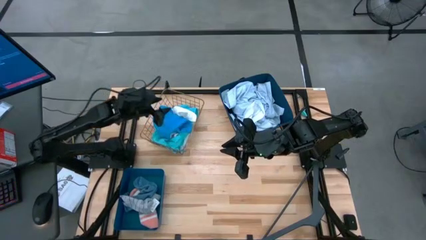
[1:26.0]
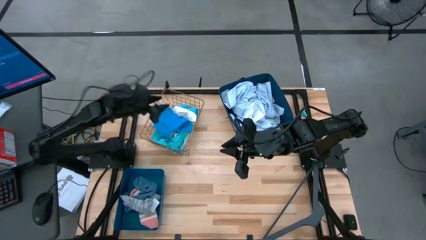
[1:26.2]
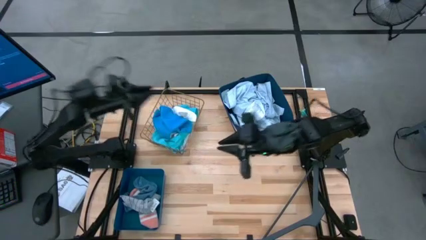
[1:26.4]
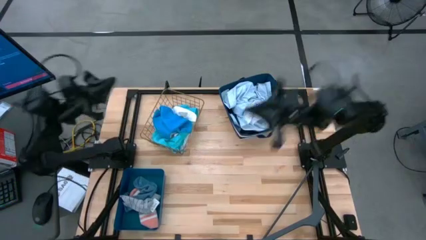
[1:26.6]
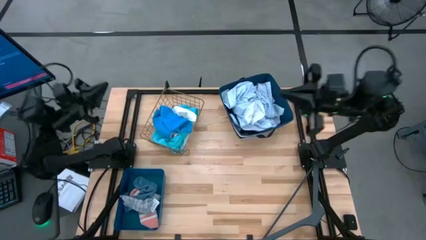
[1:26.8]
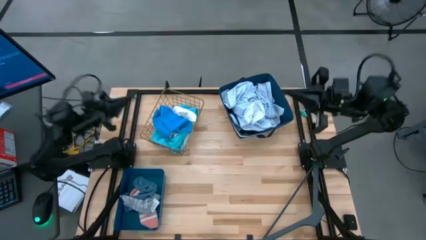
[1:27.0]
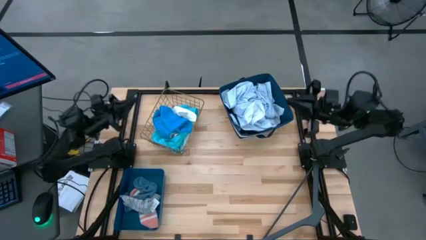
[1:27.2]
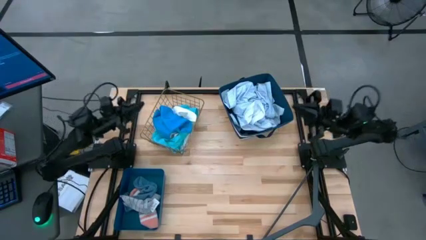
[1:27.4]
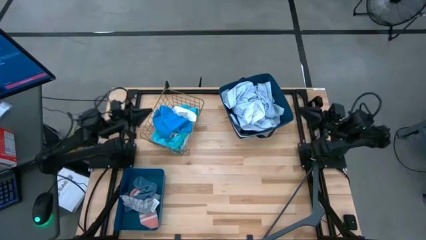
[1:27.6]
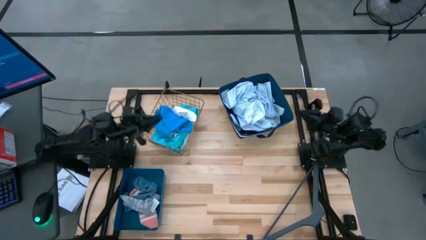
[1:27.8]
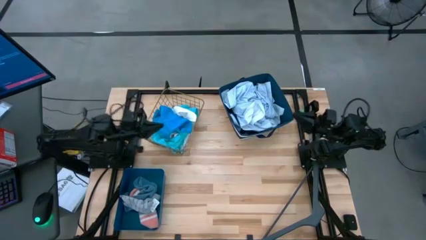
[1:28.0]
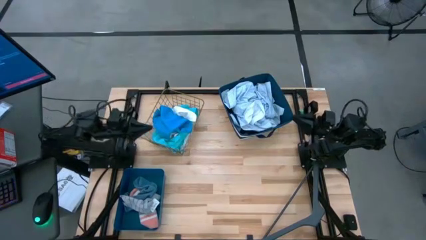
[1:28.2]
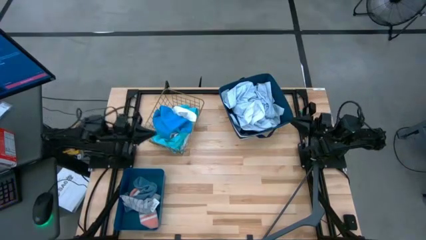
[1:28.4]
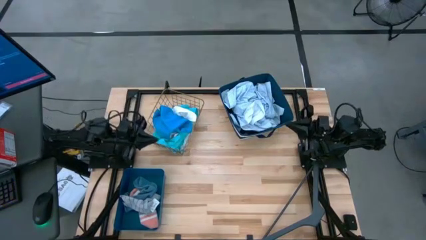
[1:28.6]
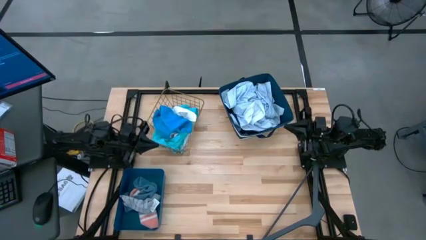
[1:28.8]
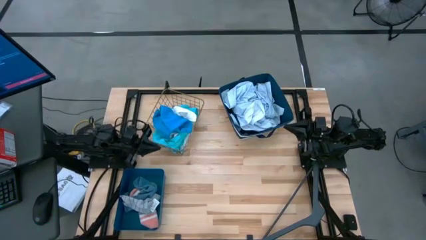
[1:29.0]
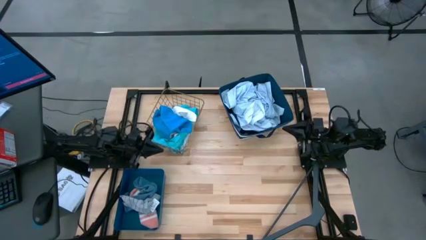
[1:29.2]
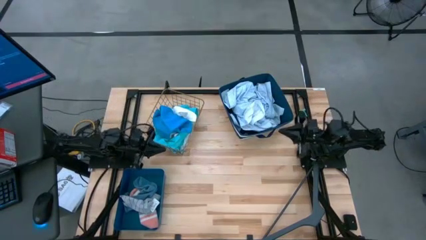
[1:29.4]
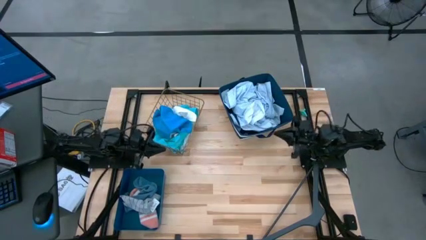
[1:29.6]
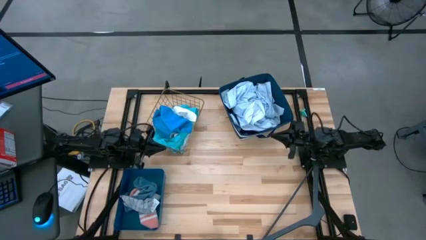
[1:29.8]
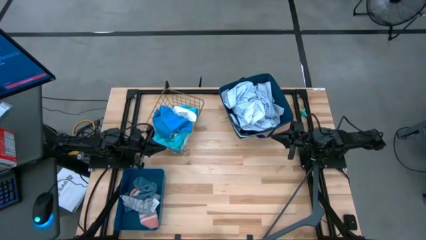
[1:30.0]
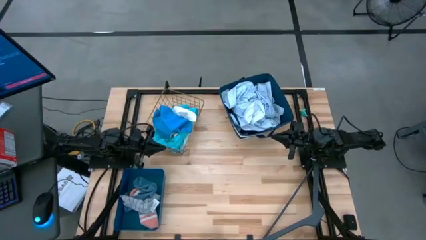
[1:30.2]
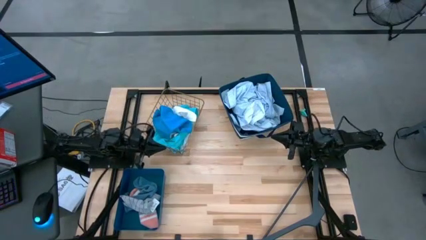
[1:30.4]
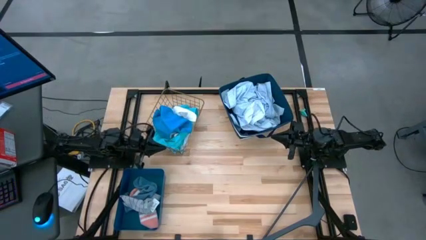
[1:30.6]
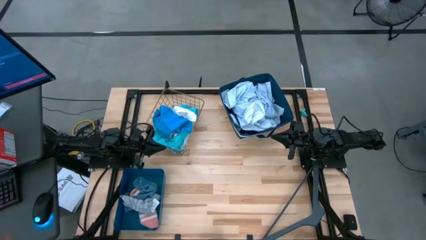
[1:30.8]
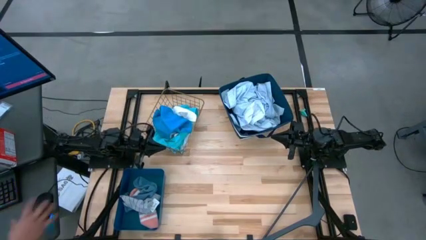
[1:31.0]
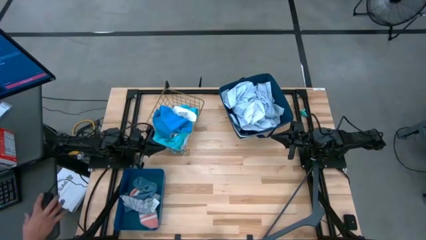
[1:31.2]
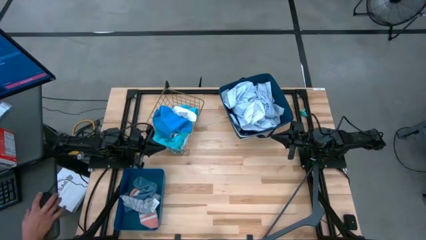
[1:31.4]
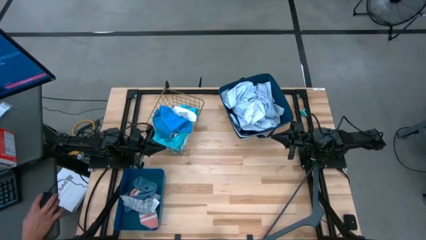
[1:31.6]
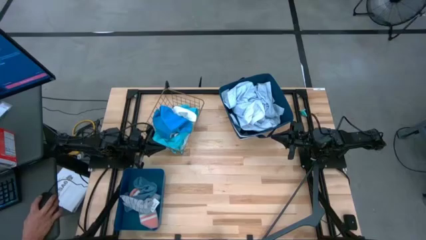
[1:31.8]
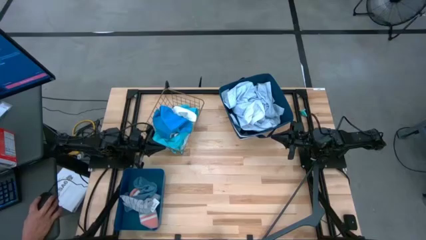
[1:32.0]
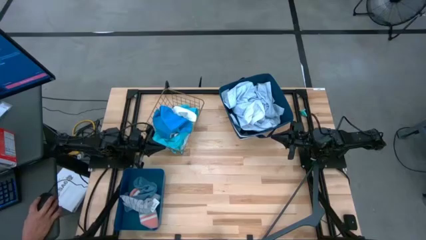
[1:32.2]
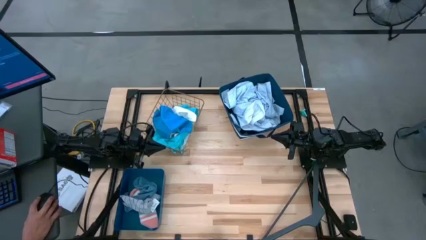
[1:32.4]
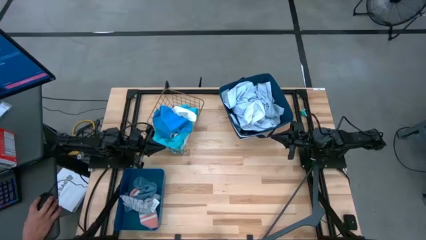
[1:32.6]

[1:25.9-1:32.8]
Task: Pick & Place Cloths
Return to Home Position

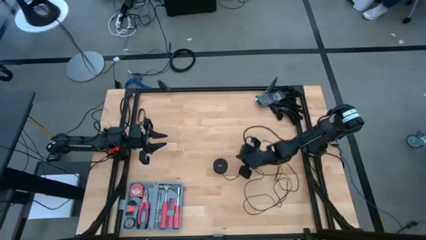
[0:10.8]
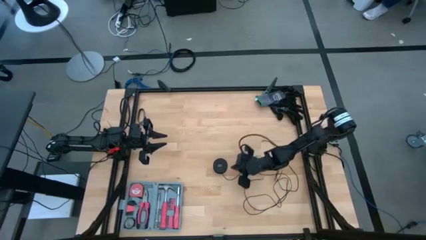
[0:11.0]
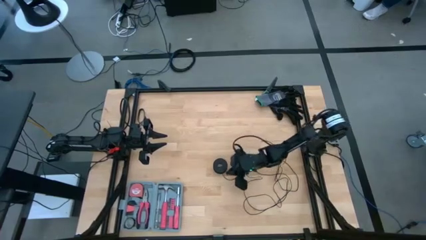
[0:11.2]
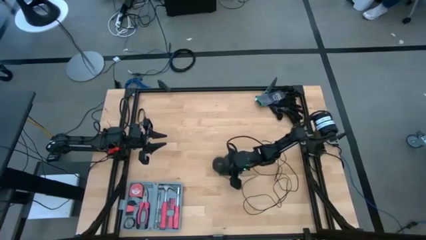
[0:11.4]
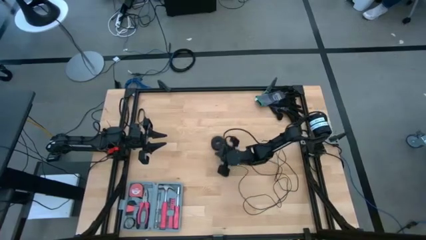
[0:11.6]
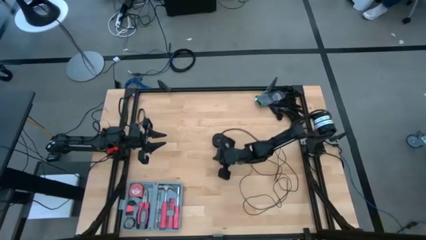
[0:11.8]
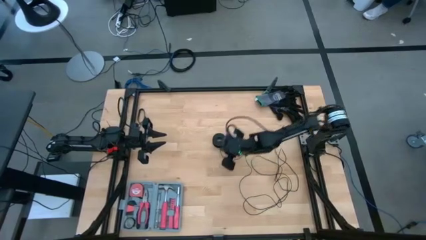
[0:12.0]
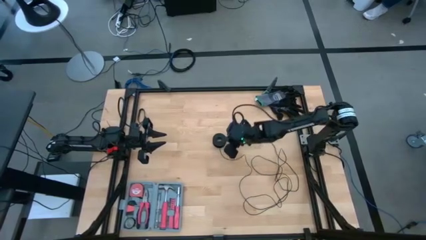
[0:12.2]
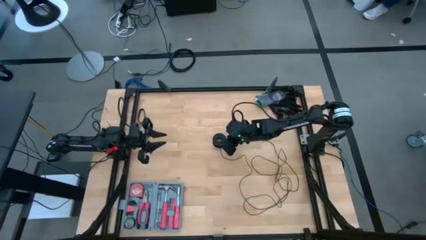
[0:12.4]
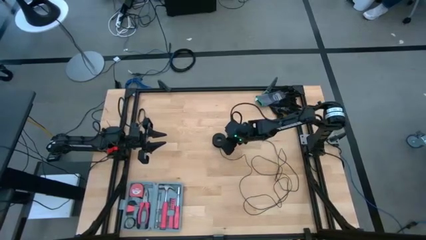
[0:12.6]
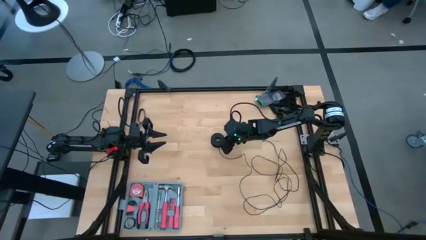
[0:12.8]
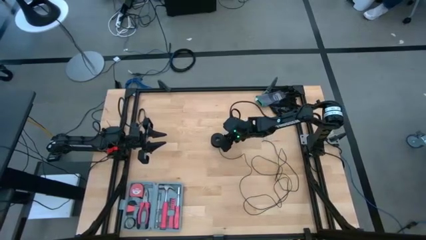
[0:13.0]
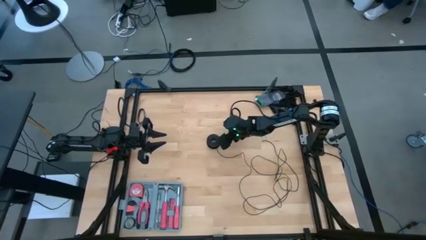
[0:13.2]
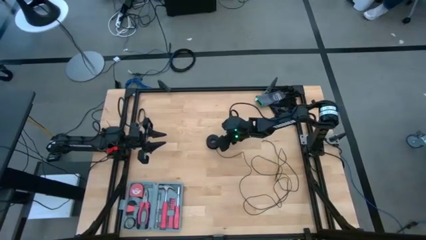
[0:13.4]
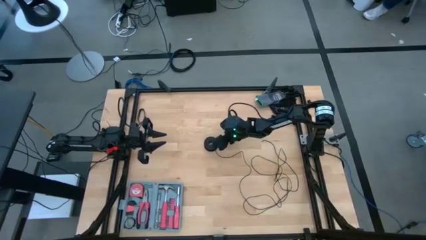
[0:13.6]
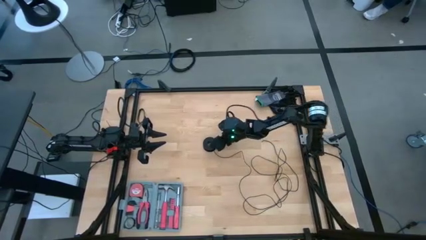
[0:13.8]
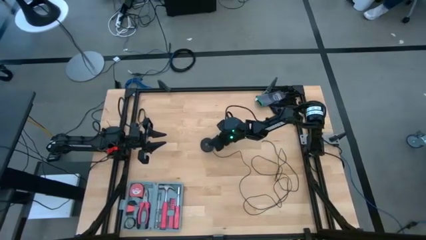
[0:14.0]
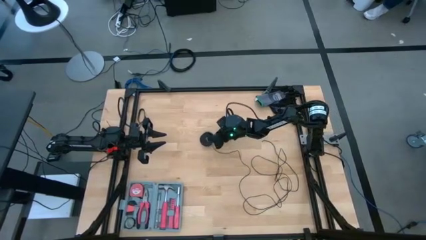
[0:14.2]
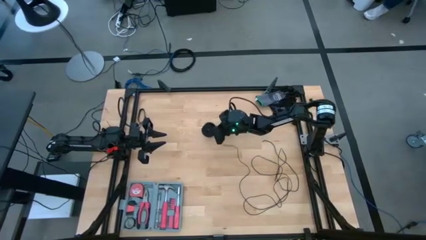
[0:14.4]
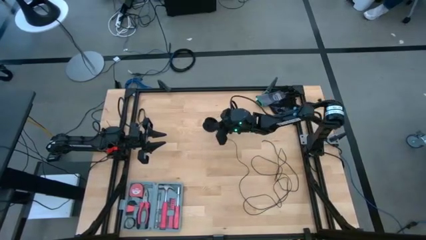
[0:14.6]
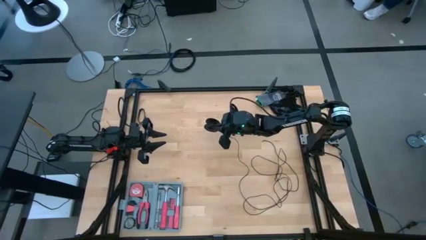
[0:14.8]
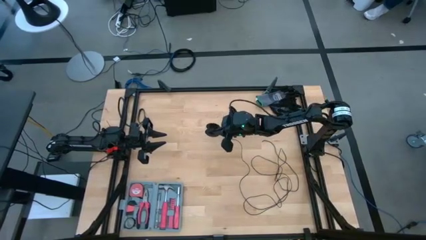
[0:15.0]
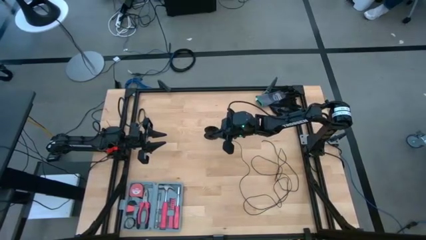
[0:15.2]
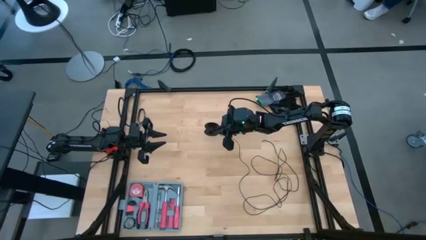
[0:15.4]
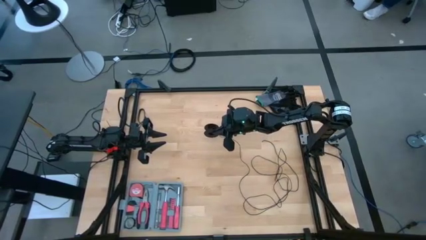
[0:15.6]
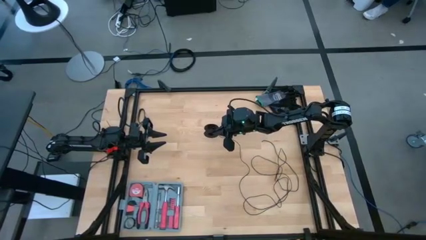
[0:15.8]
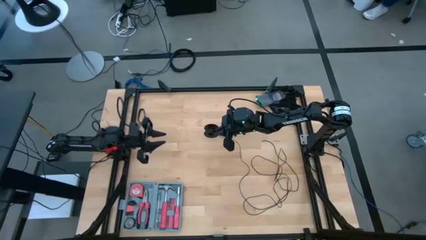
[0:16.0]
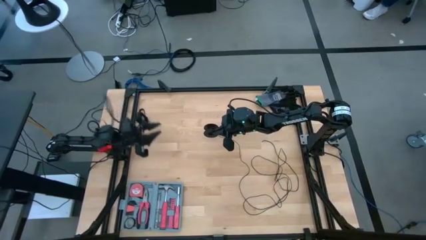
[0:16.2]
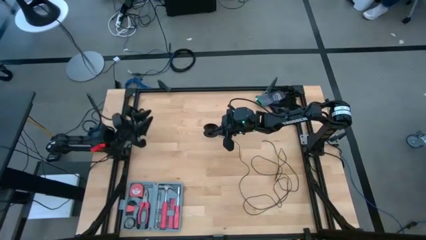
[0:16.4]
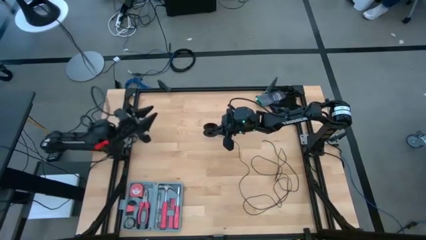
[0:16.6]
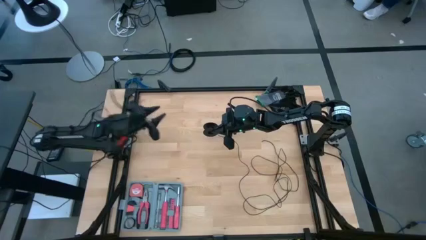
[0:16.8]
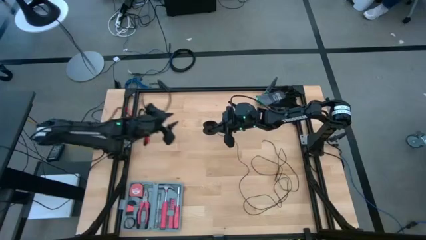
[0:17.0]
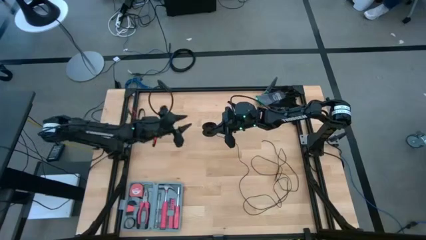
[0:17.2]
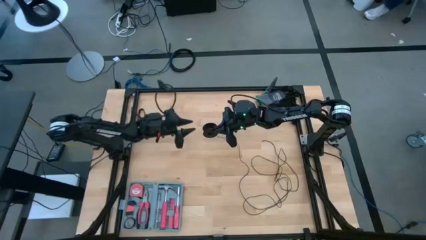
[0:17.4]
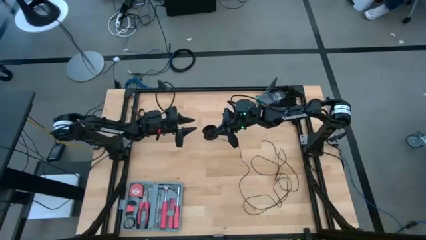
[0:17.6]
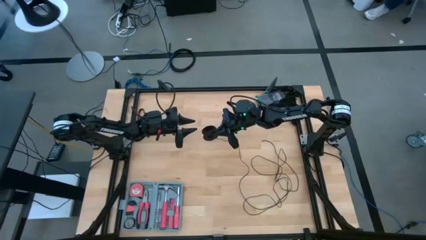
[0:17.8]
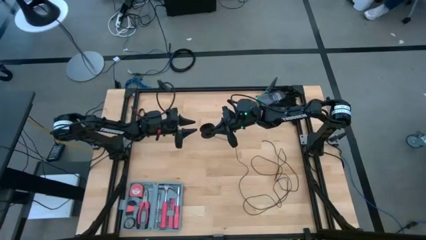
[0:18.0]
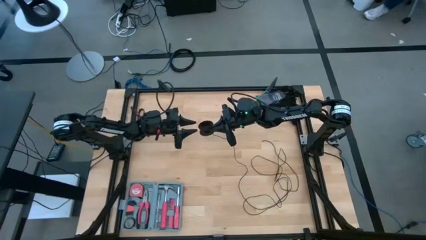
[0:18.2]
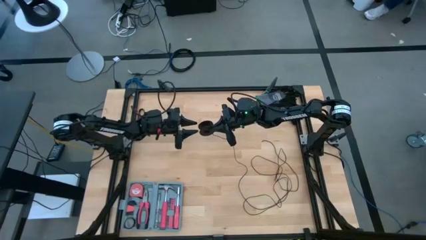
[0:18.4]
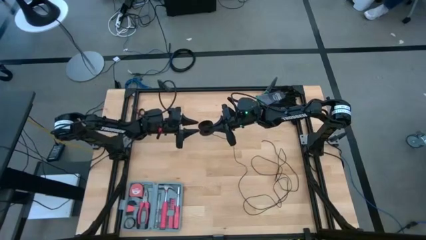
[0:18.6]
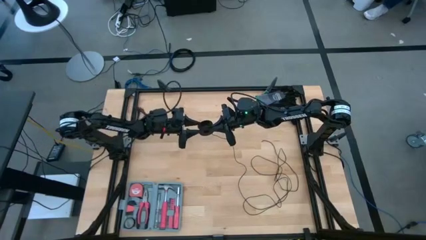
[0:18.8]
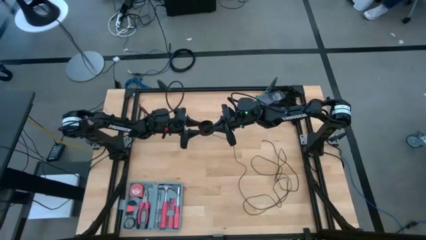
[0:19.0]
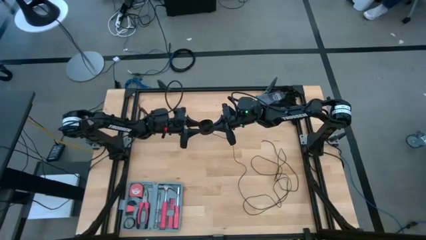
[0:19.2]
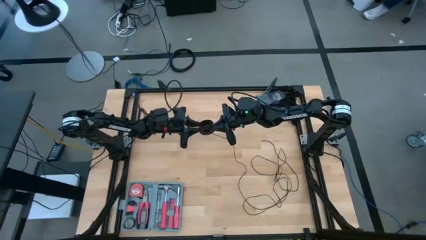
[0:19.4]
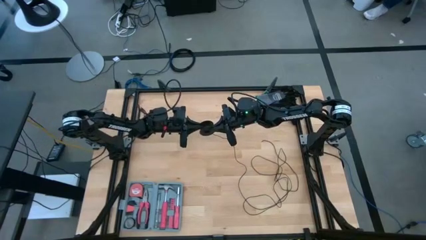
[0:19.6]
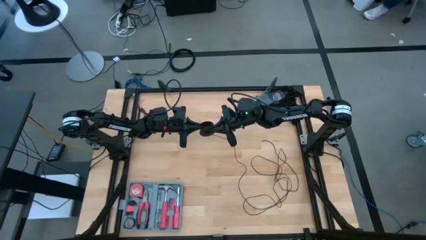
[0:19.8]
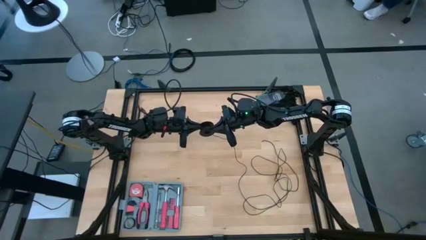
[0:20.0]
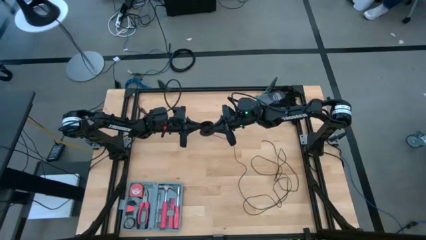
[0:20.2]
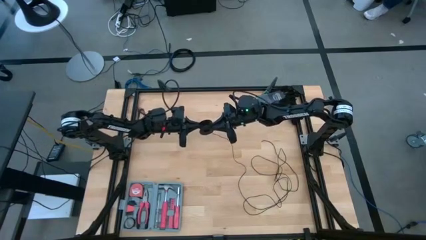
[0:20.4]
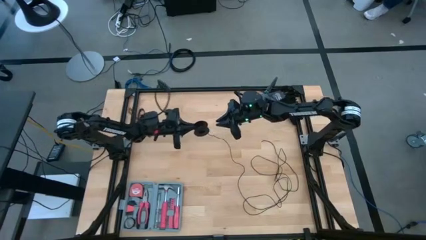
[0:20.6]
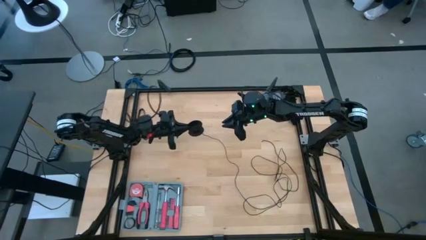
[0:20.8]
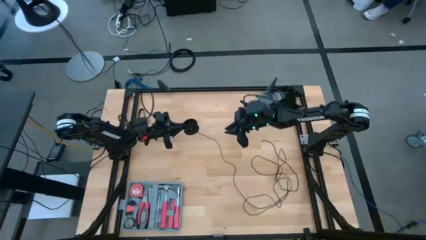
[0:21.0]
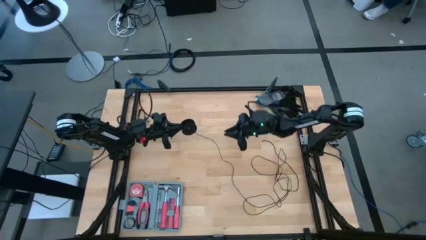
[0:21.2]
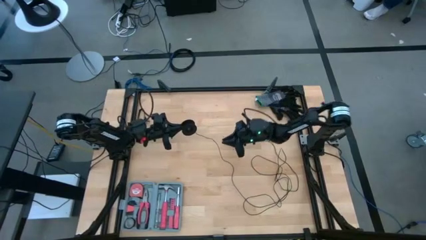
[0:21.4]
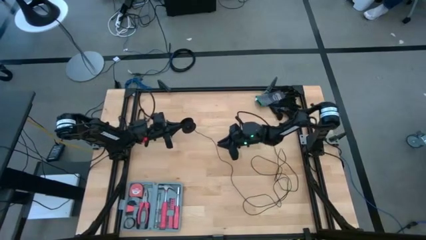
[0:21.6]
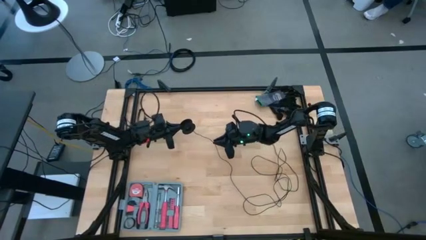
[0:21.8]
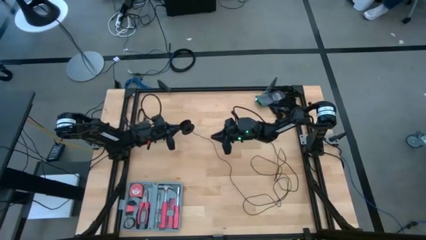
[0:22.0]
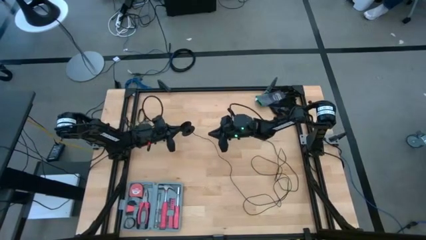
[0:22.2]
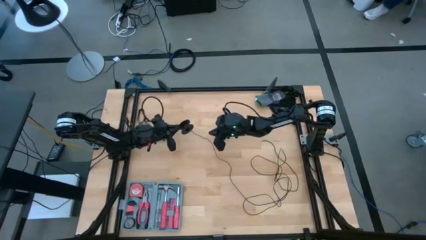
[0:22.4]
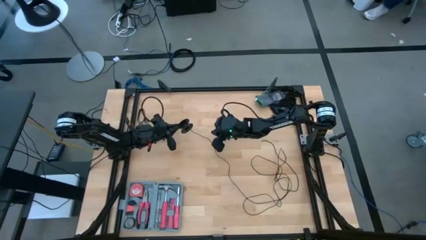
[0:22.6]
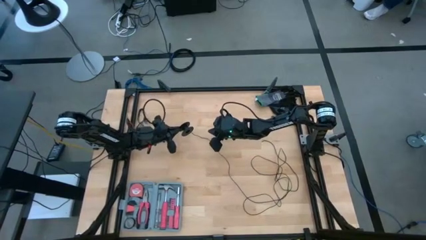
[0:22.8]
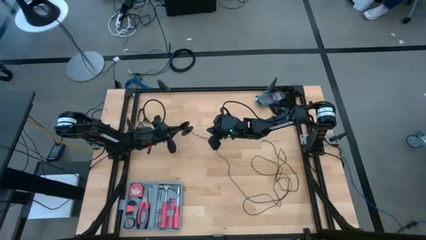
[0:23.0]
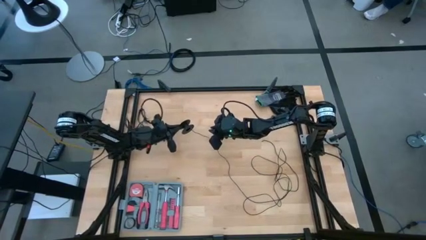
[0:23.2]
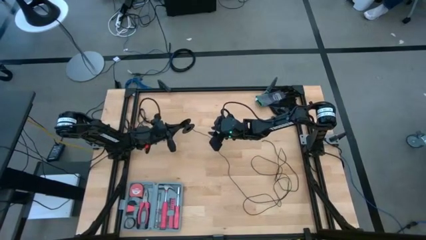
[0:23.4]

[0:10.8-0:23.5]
Task: Coil cords
Coil the black wire on the spool
